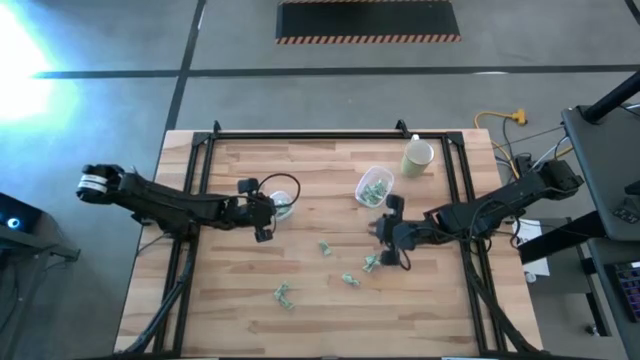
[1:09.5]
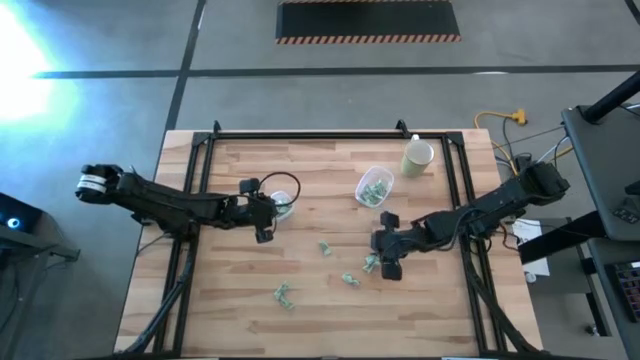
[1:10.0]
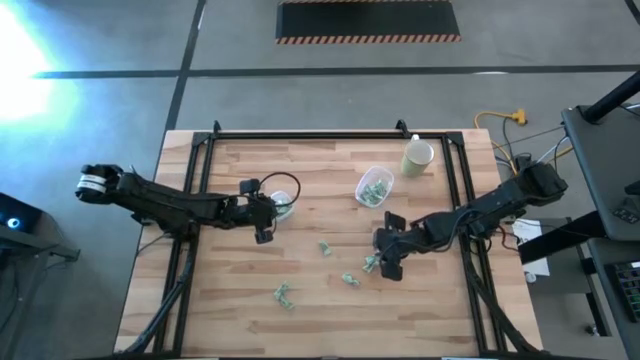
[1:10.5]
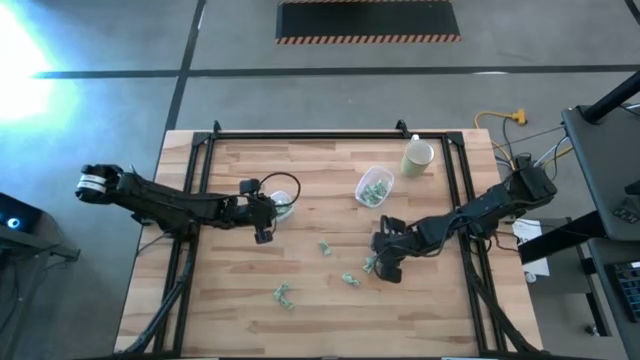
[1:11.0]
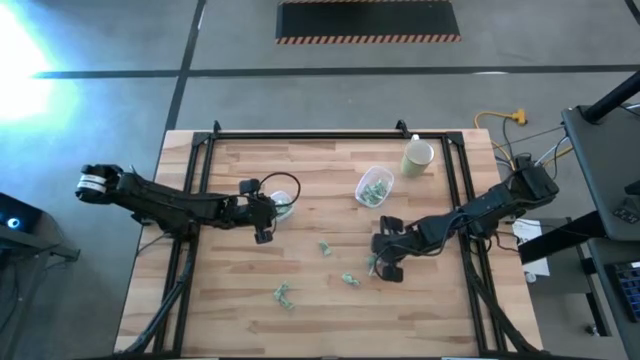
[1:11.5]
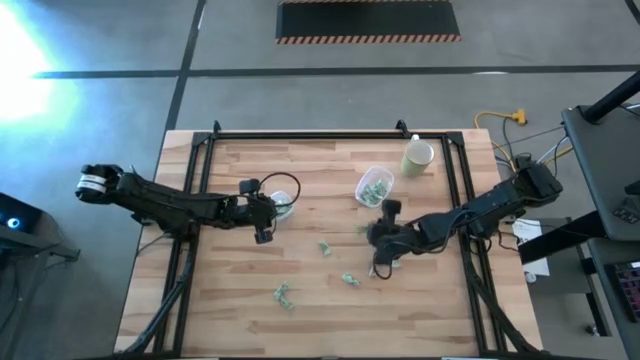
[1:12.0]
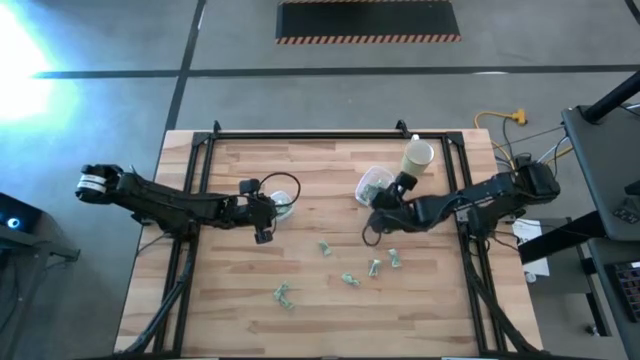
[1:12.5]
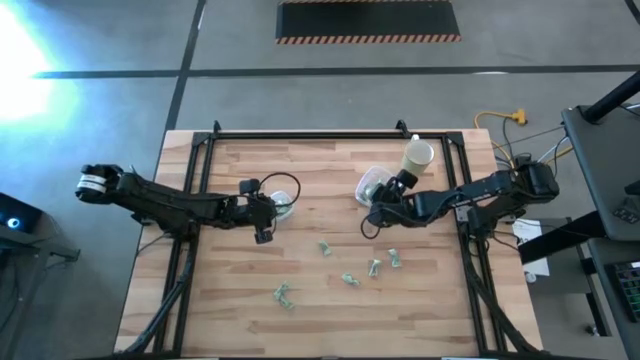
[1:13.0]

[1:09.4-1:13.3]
Task: Pick and place items into bin
Put the stevia packet into the right transparent bin

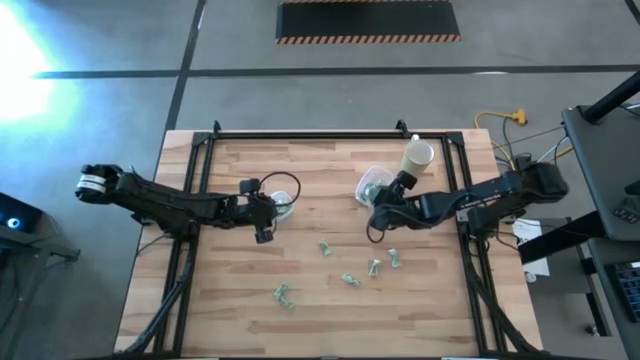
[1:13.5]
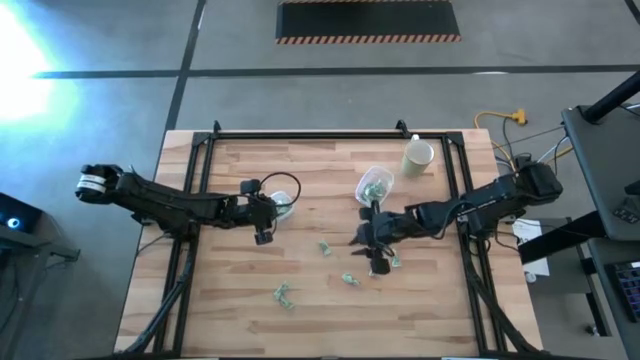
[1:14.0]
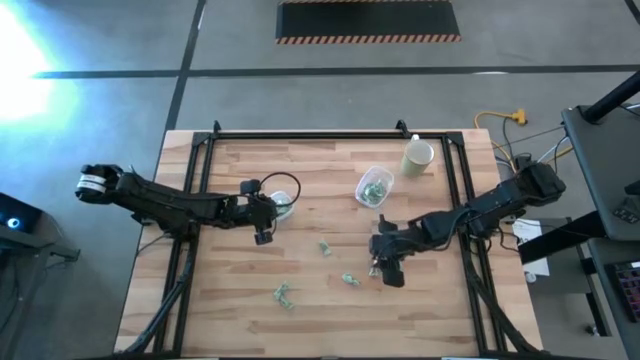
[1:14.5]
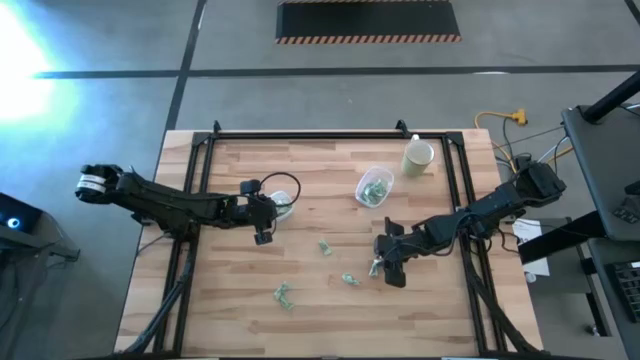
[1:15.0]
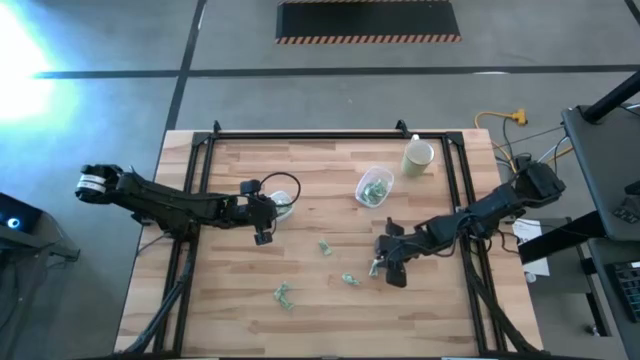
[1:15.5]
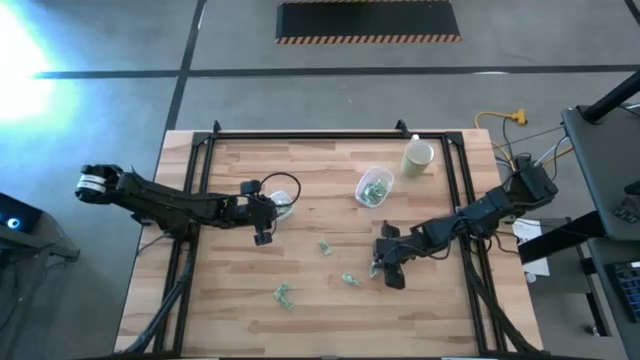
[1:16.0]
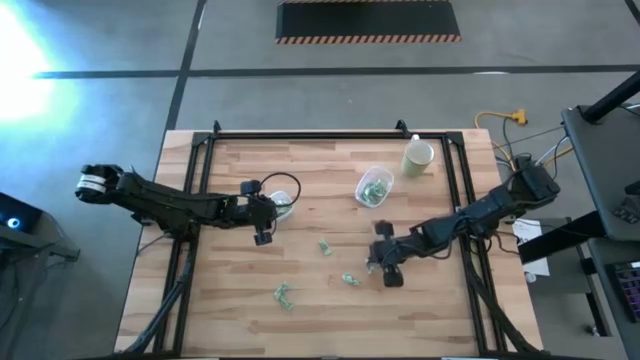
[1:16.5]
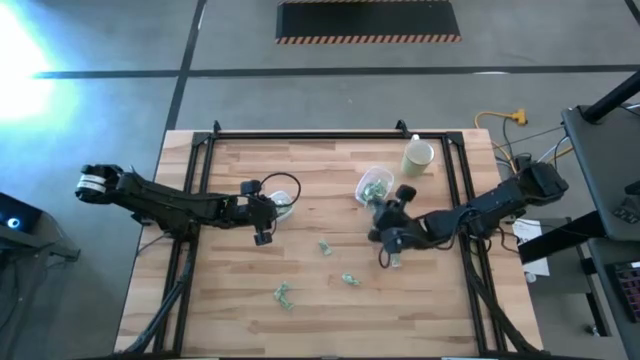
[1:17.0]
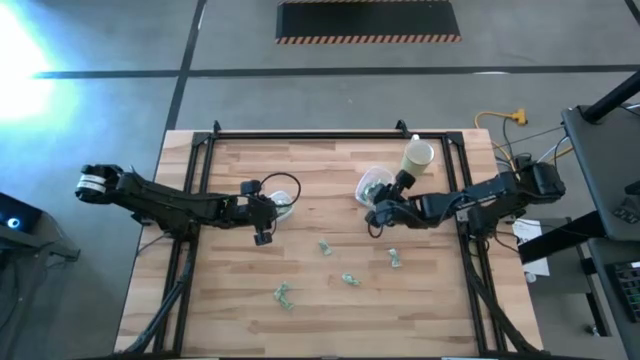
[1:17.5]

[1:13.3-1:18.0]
Put the stevia packet into the right transparent bin

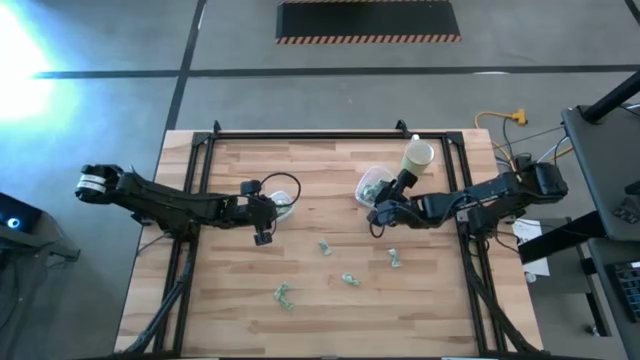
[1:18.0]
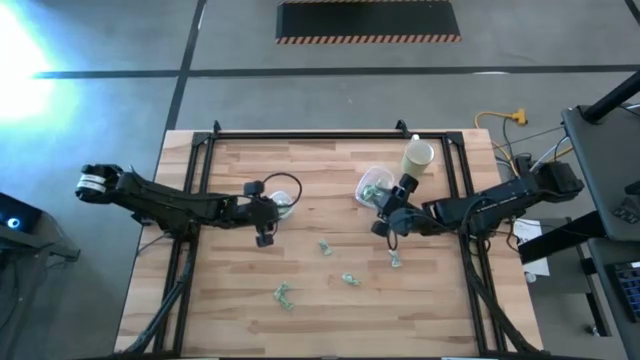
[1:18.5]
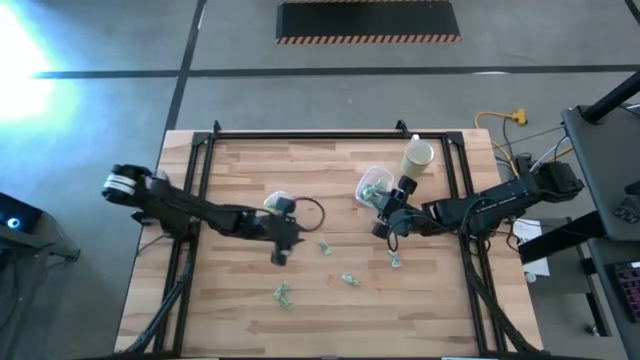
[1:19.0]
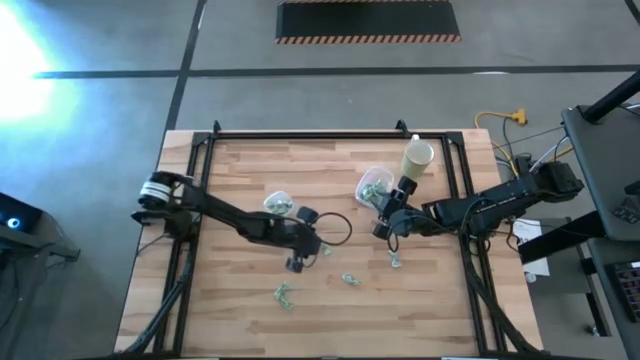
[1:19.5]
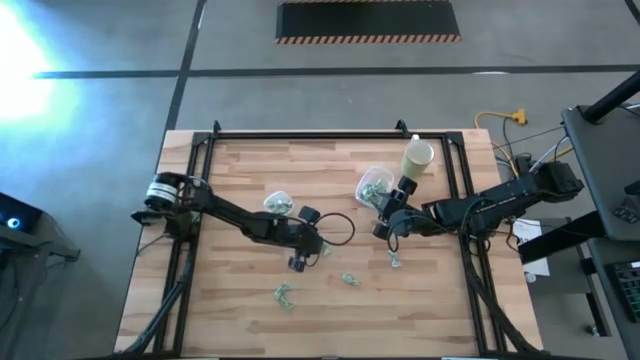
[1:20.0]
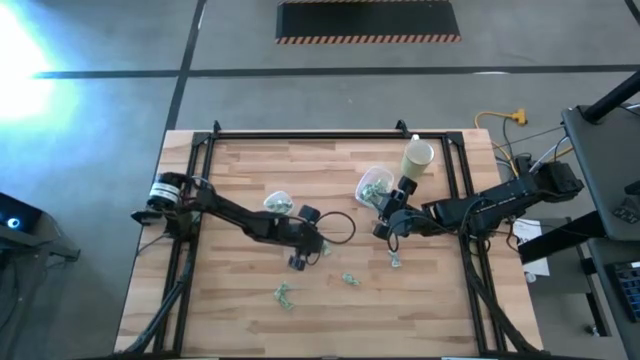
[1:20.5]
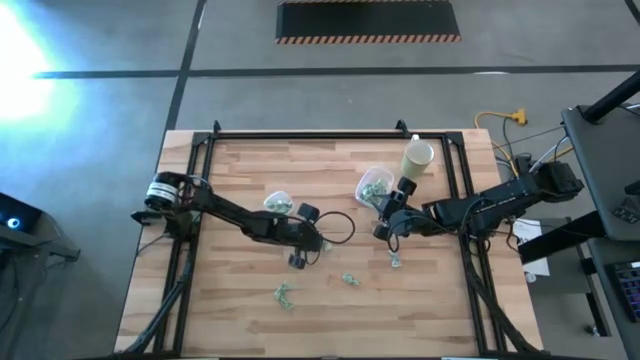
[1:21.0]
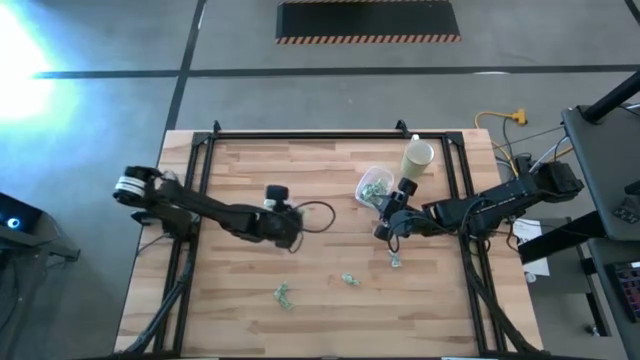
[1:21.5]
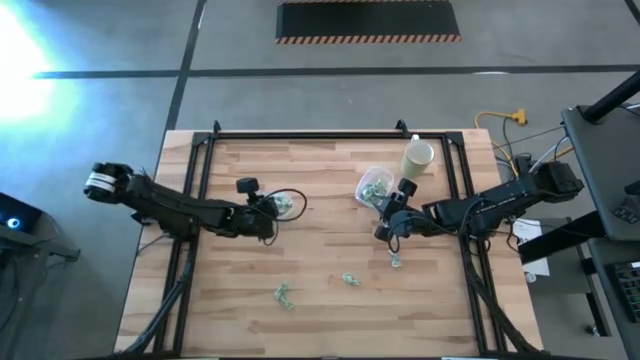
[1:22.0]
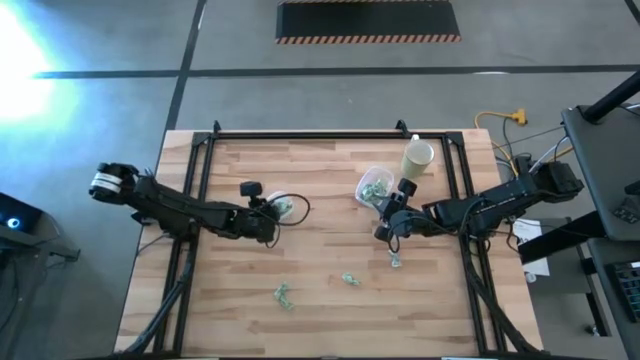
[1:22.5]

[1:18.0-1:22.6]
Put the stevia packet into the left transparent bin

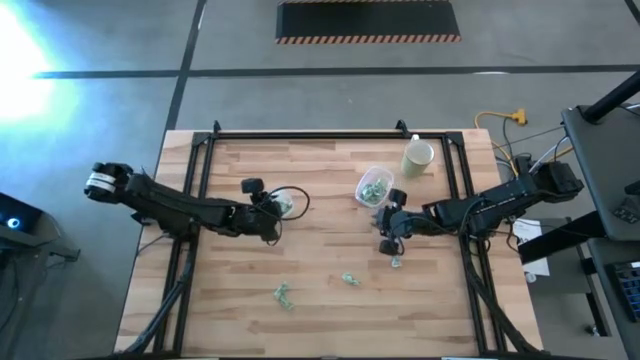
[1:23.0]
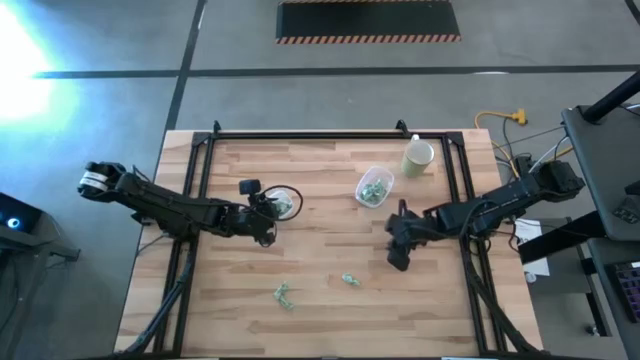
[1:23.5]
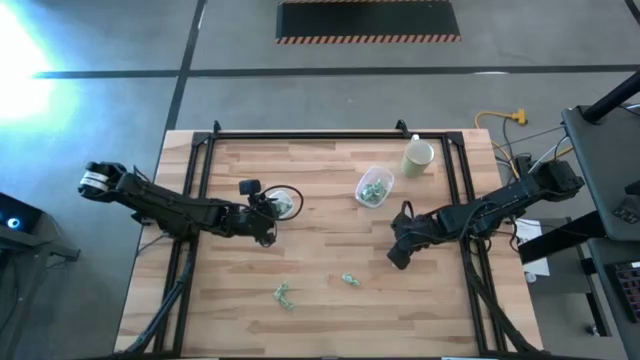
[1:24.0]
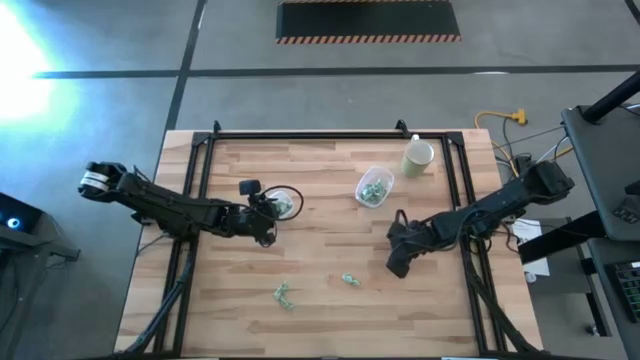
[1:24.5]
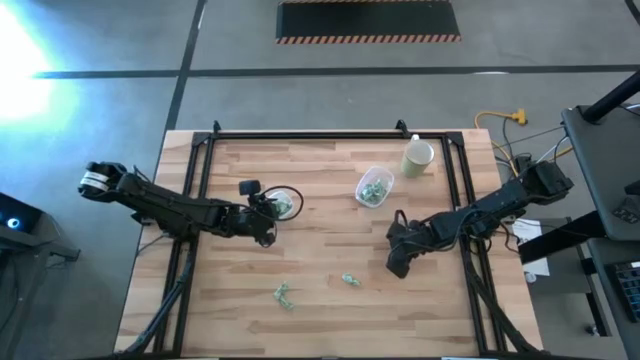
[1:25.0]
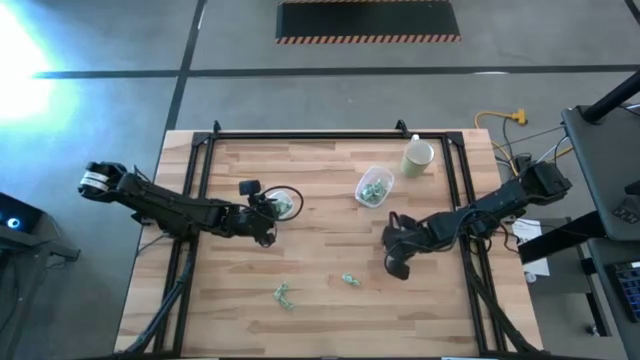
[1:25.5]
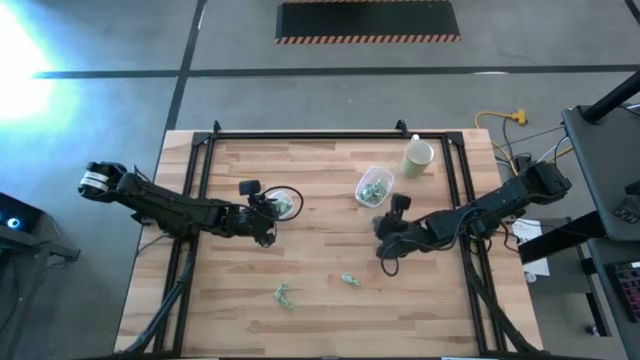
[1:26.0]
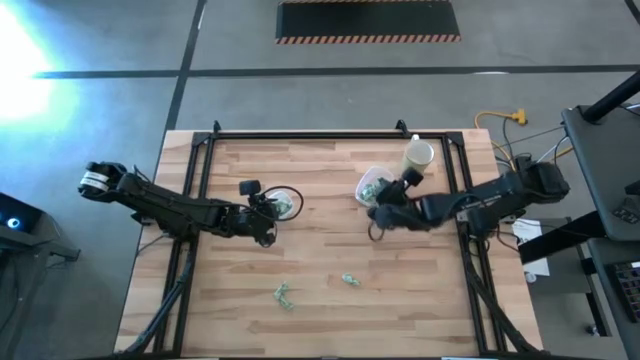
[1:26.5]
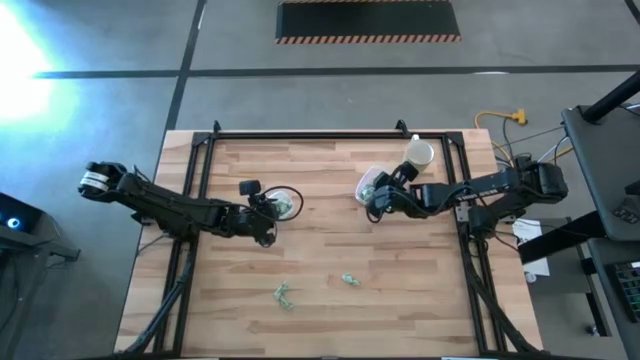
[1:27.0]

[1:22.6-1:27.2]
Put the stevia packet into the right transparent bin

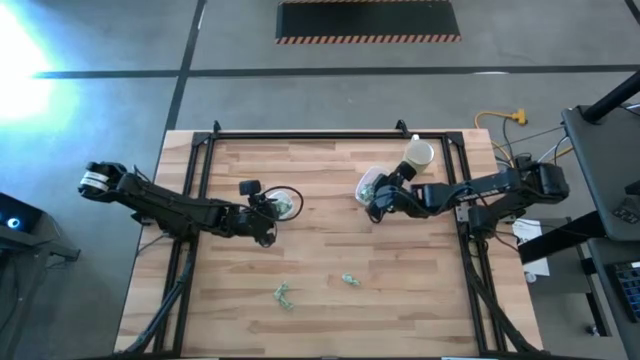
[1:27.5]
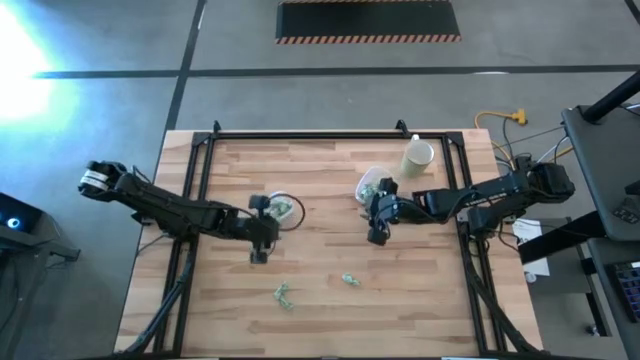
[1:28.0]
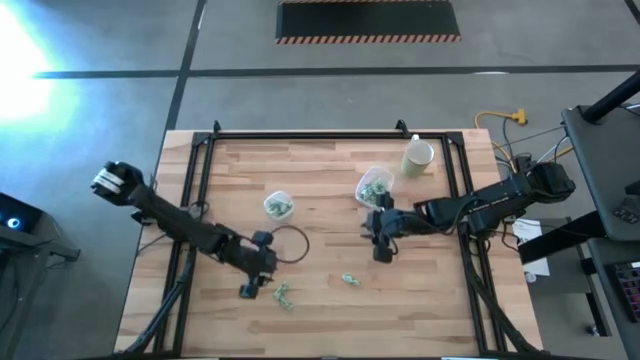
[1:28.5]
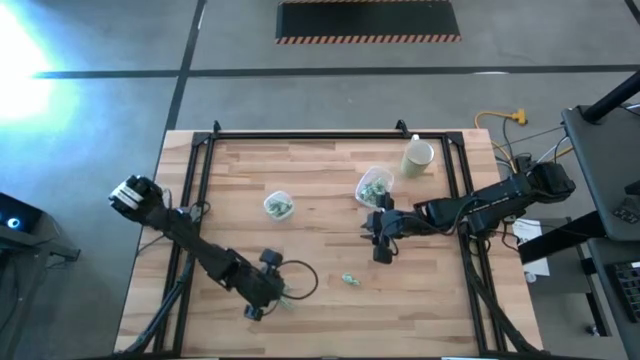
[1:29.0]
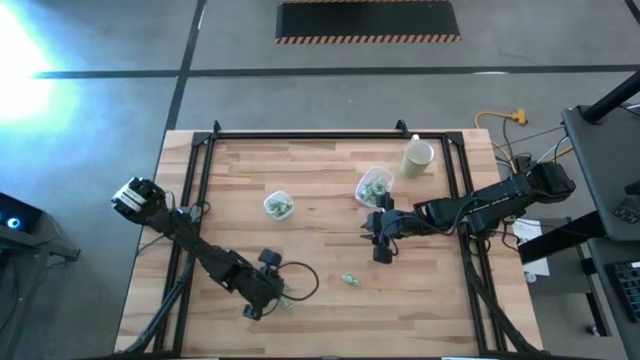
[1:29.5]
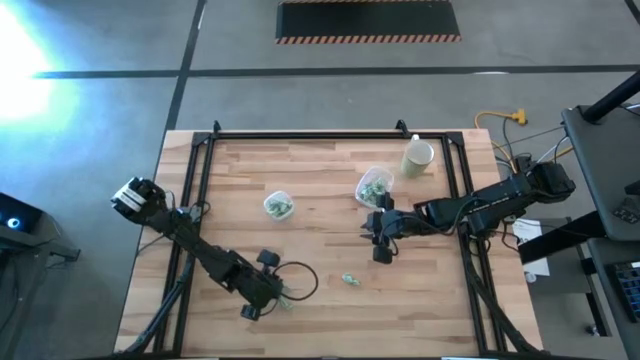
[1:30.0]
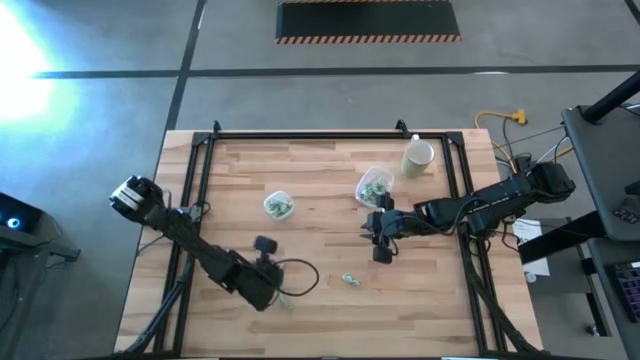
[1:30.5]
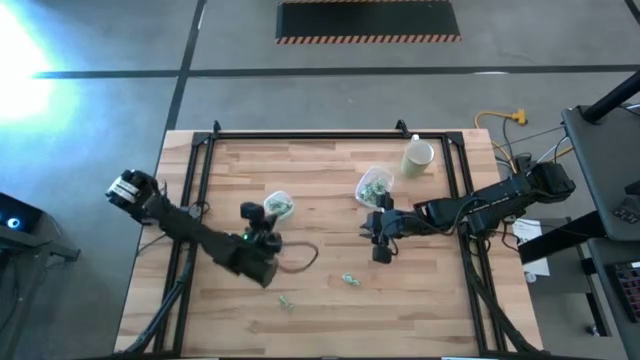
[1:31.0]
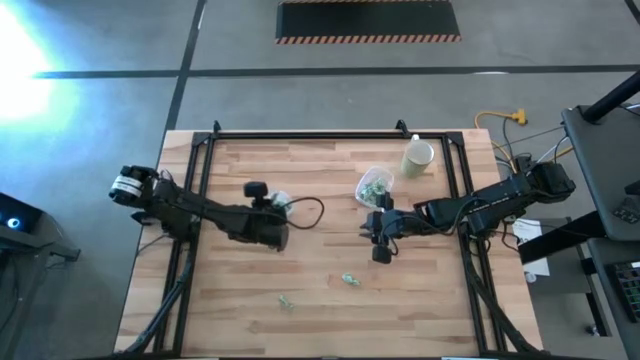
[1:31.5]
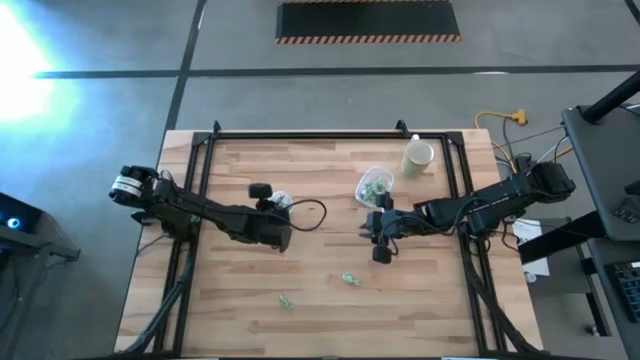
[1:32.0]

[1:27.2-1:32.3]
Put the stevia packet into the left transparent bin
